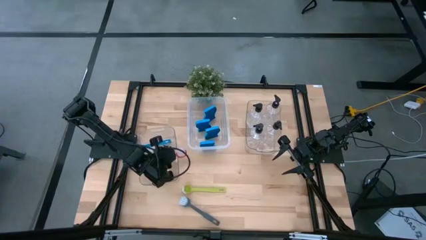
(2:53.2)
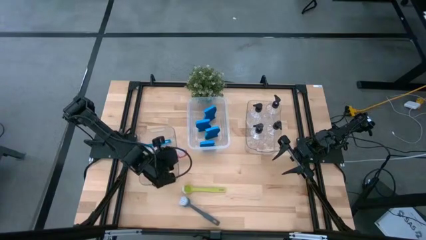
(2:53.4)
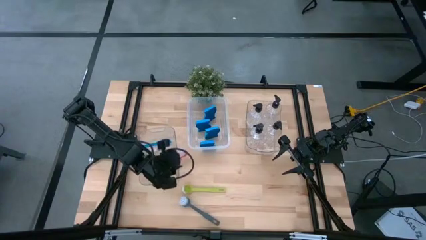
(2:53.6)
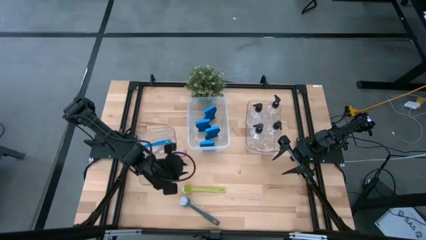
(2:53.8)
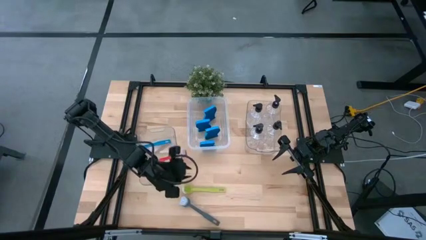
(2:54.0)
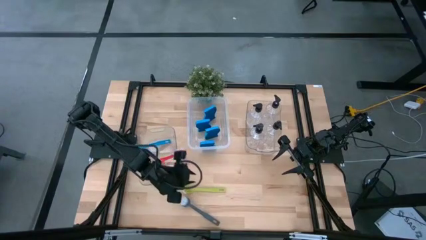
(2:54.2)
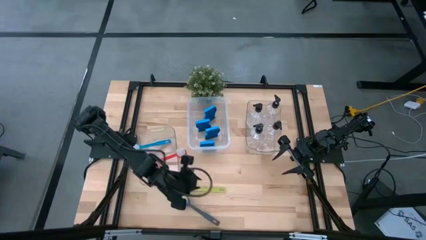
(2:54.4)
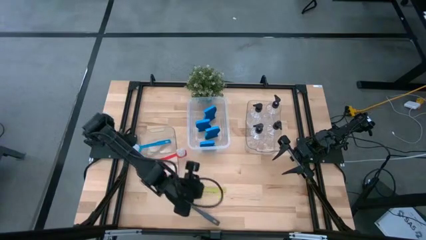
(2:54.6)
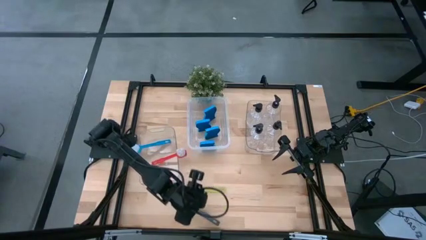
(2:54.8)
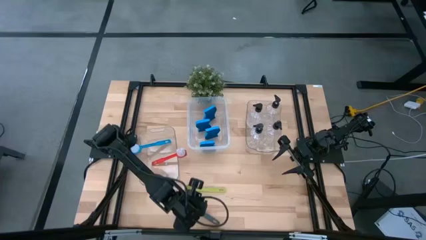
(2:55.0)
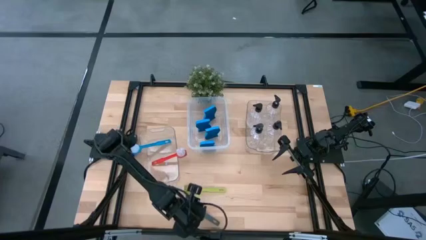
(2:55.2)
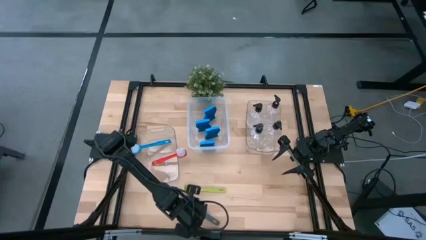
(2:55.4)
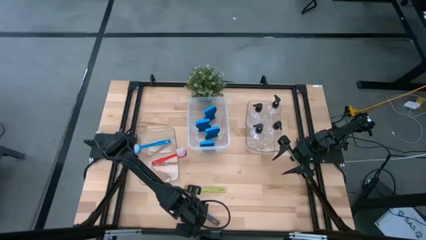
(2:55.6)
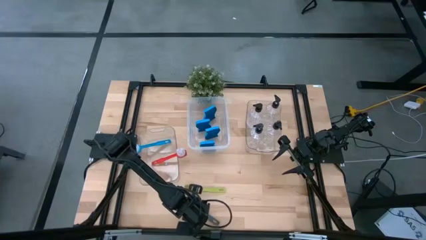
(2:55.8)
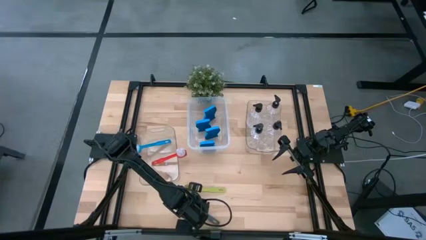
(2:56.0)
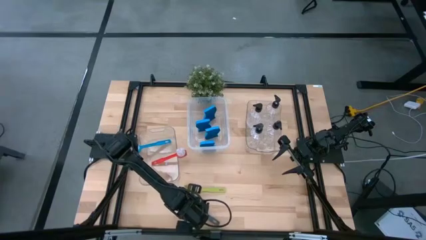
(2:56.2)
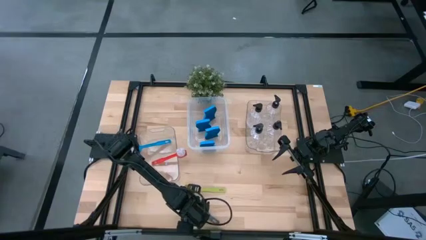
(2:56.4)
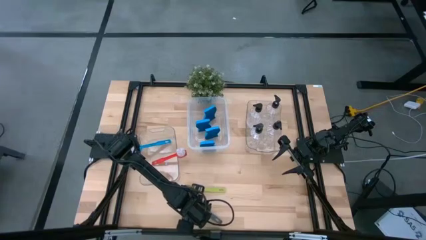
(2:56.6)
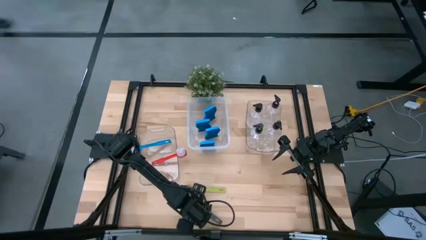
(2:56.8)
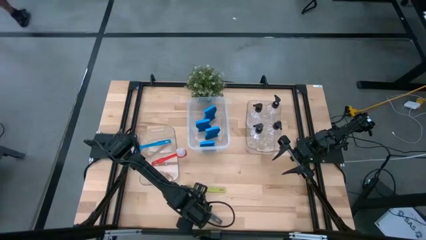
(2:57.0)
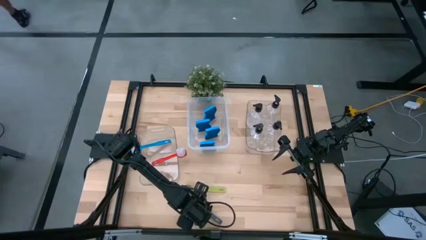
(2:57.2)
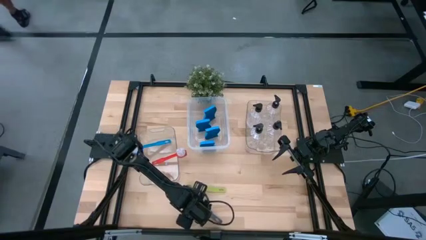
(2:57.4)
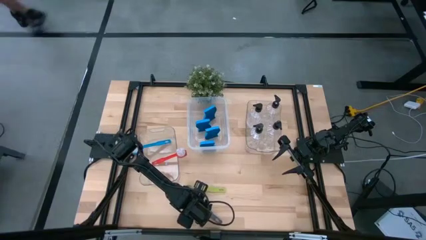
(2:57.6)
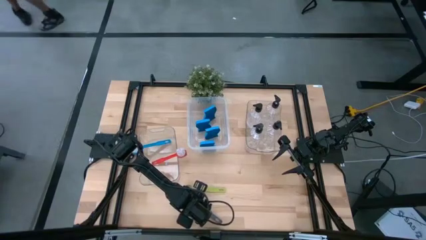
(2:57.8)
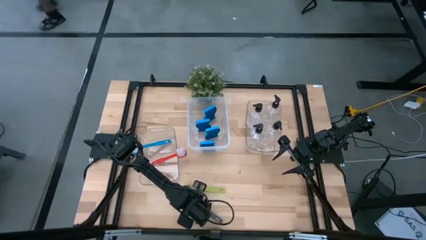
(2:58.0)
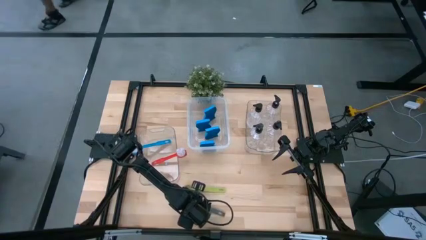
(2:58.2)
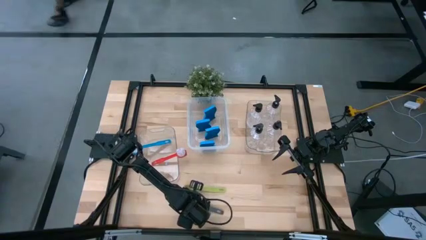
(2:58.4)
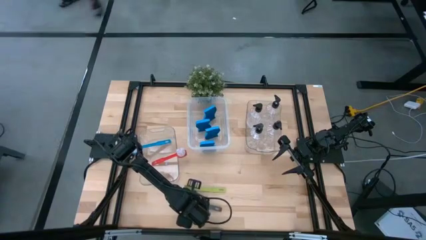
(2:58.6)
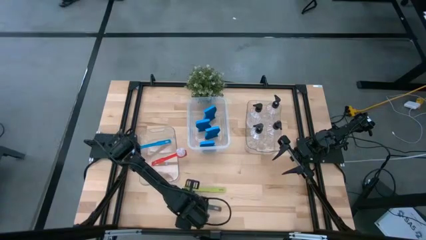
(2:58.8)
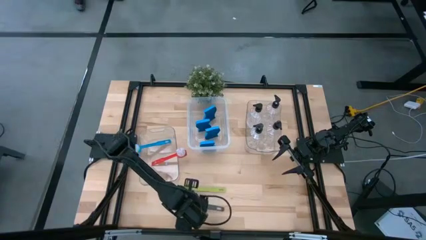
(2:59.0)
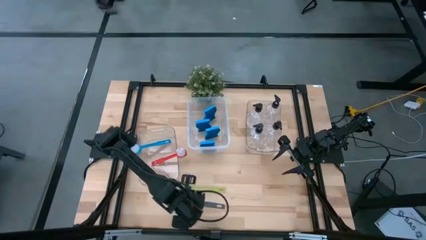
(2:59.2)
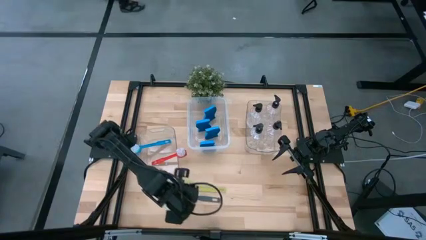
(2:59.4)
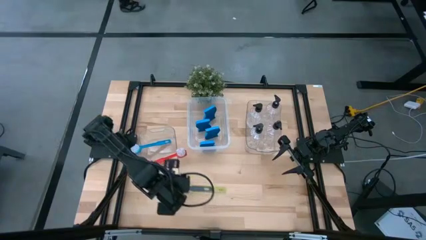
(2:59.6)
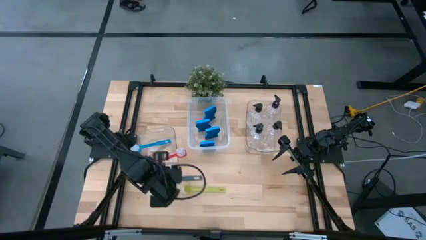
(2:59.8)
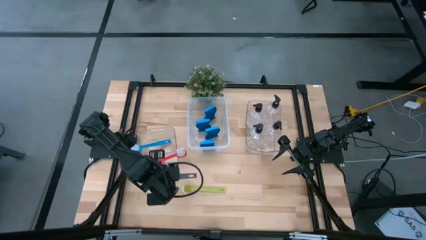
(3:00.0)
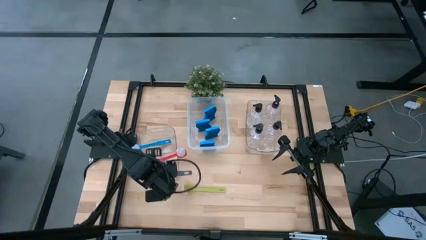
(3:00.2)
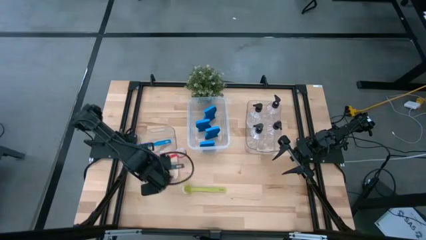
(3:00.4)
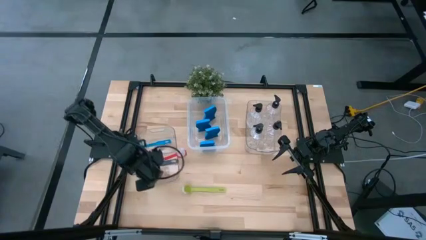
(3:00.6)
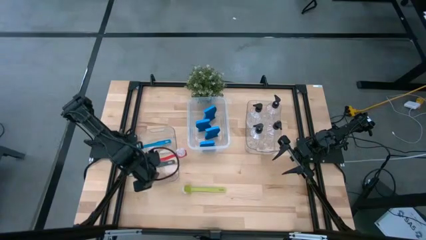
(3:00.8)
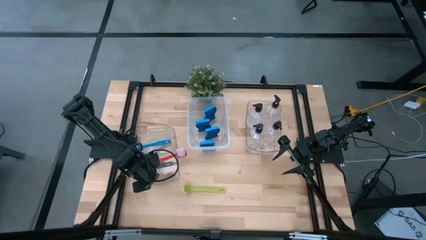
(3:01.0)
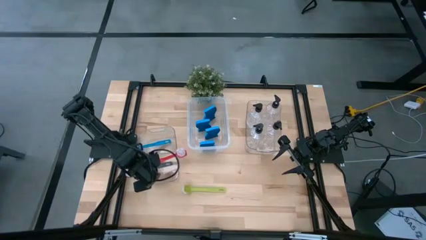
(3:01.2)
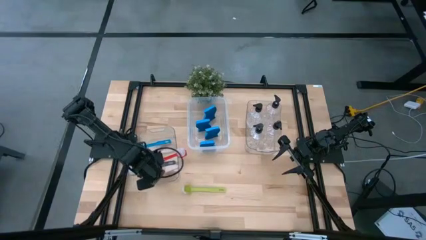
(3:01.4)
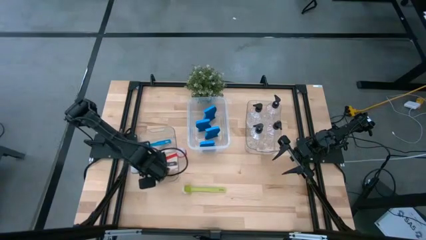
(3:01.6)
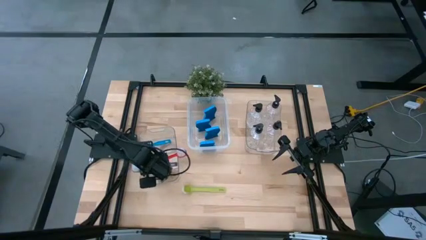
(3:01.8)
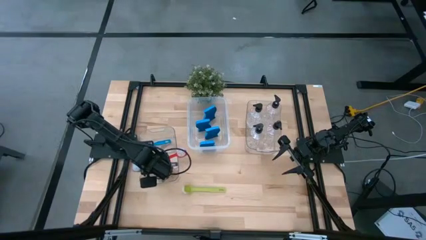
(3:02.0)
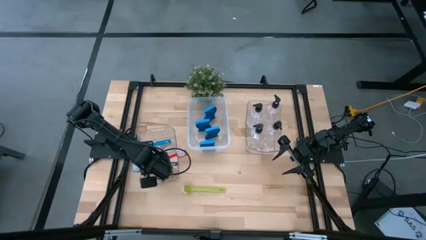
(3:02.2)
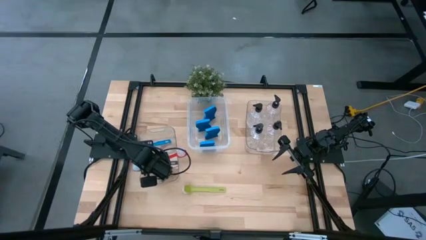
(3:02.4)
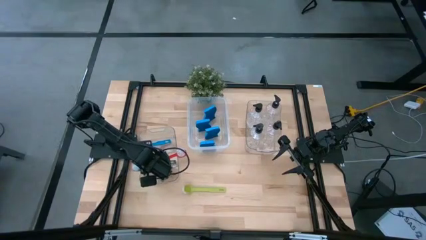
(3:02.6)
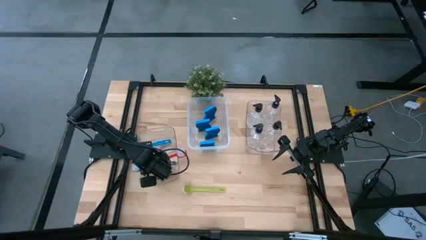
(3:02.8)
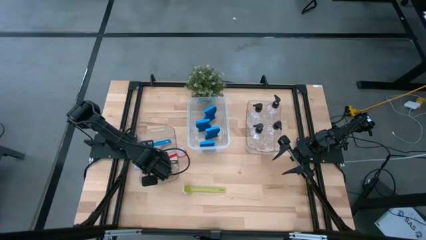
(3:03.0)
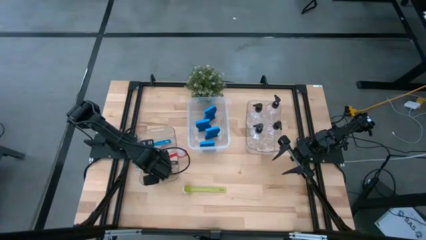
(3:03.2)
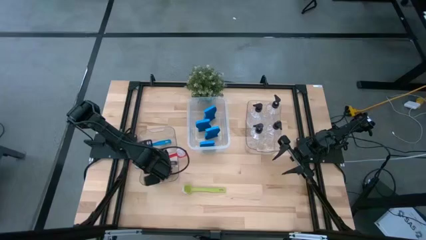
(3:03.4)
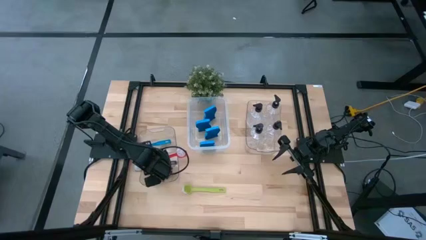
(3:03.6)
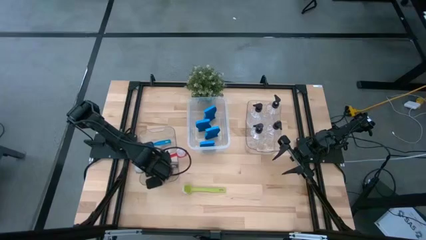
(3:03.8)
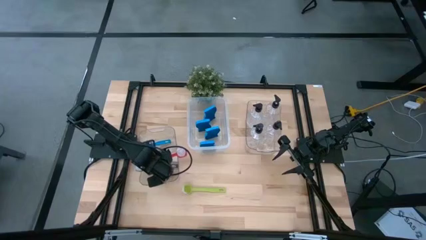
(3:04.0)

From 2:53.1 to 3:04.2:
Task: Pick & Place Kitchen Sink Supplies
Put the gray brush into the left transparent bin

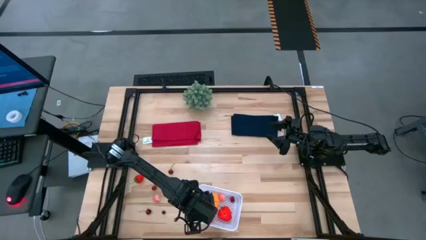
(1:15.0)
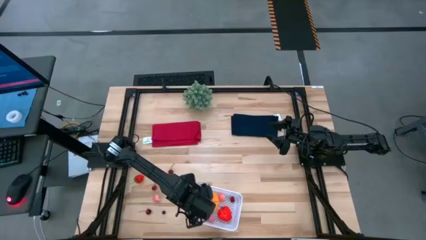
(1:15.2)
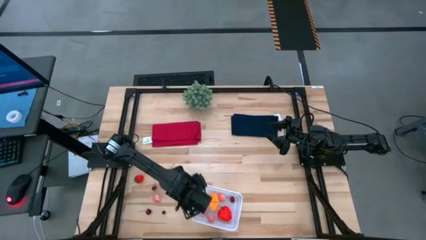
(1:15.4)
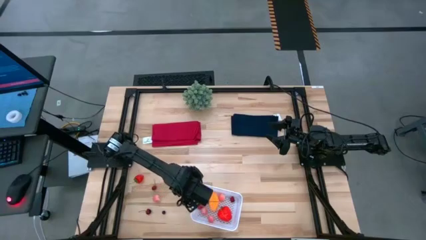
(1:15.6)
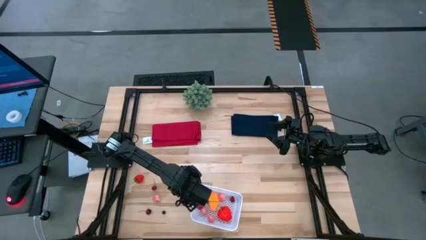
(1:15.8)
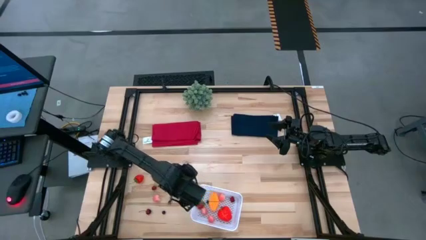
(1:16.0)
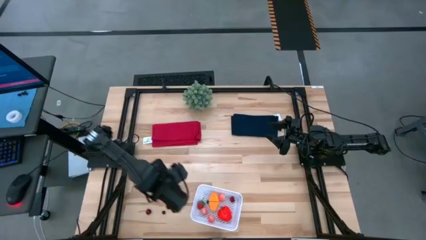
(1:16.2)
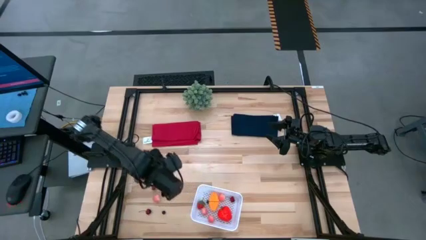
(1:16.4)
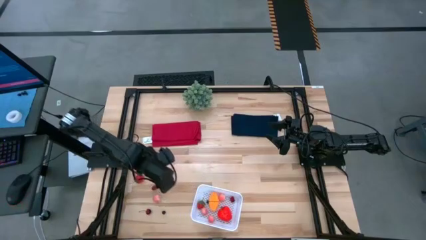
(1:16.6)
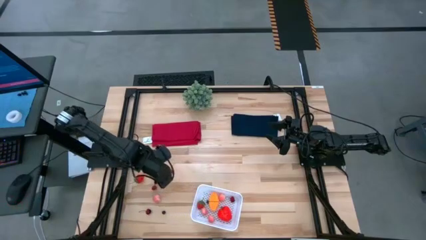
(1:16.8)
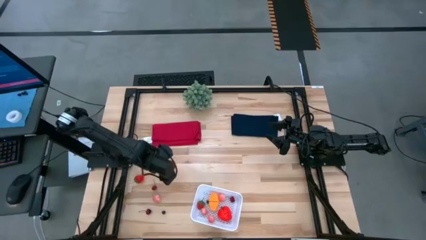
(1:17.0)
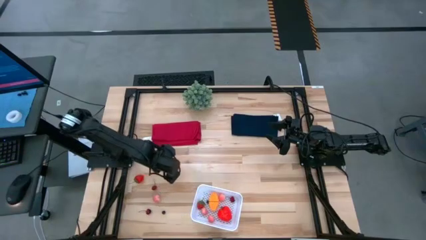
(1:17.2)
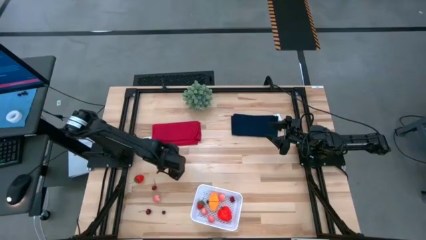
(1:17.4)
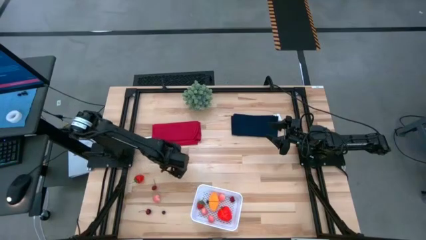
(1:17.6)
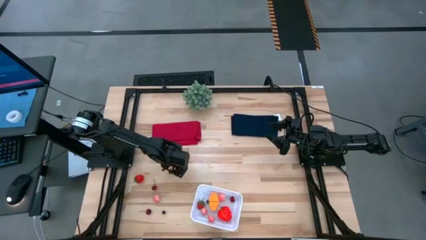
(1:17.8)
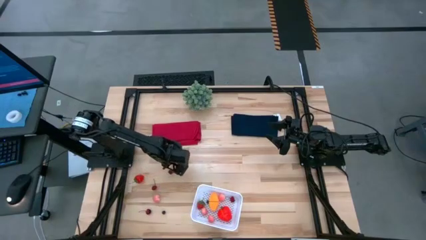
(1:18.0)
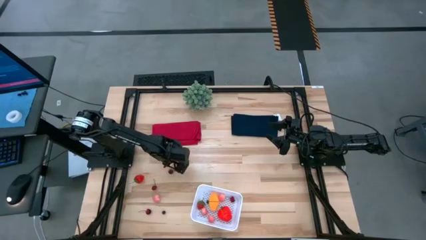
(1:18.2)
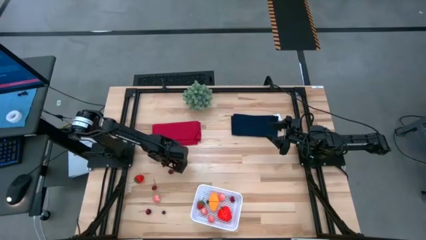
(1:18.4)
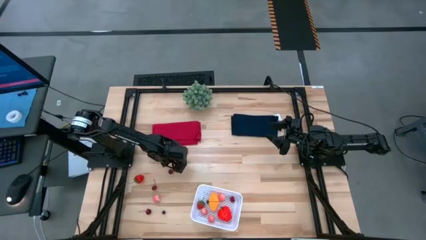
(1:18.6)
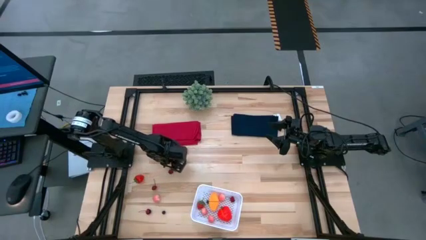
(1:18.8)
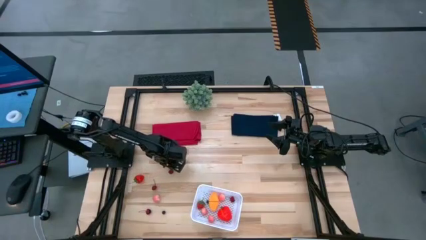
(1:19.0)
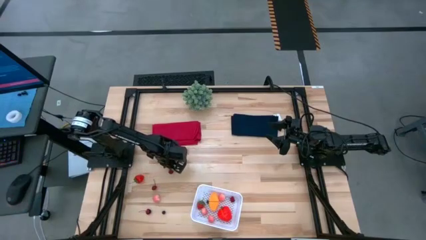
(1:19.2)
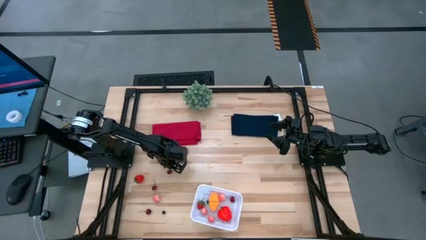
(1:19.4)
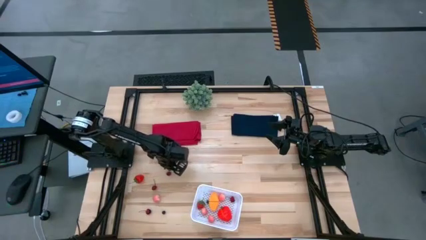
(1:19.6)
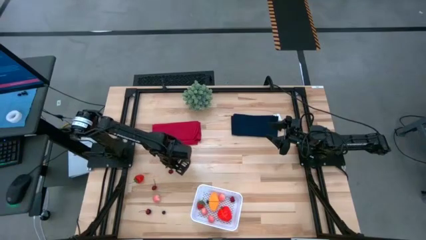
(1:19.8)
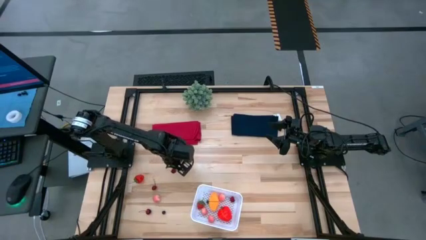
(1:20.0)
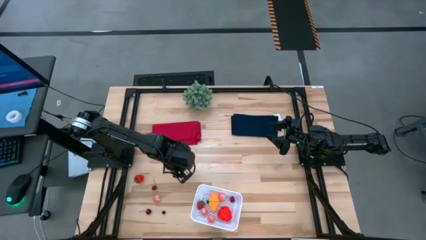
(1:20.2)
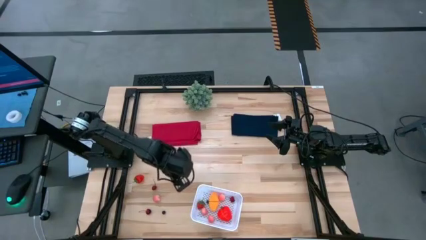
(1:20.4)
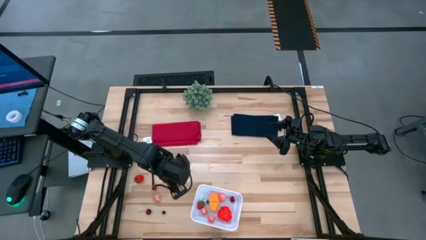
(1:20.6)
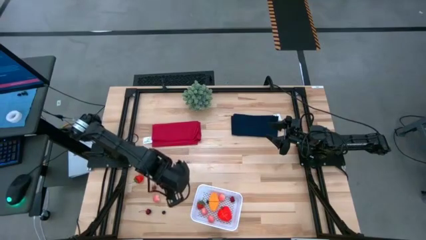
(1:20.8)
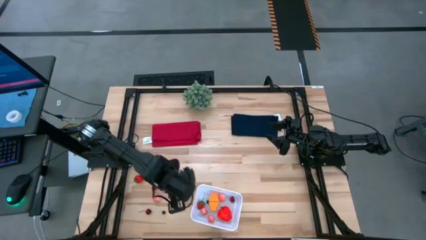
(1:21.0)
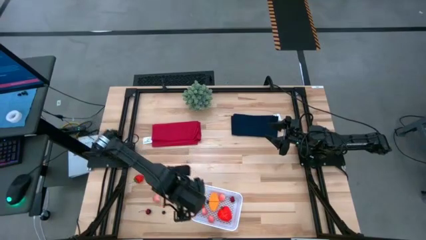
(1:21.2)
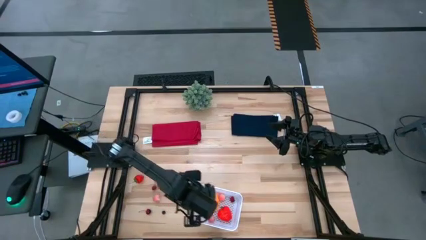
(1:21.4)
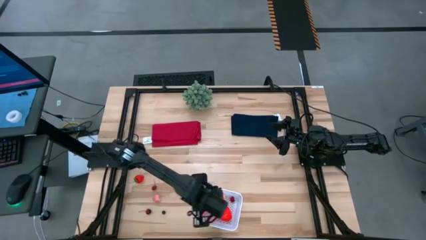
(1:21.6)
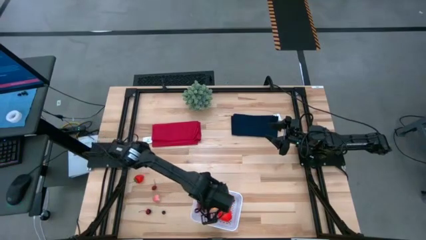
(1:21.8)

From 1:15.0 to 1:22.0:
Task: Pick and placing Produce into tupperware
Put the top cherry into the white bin
